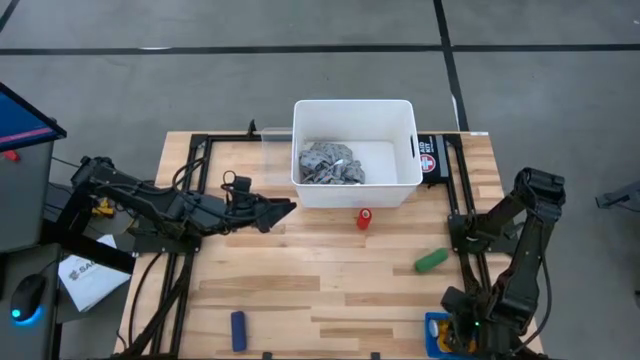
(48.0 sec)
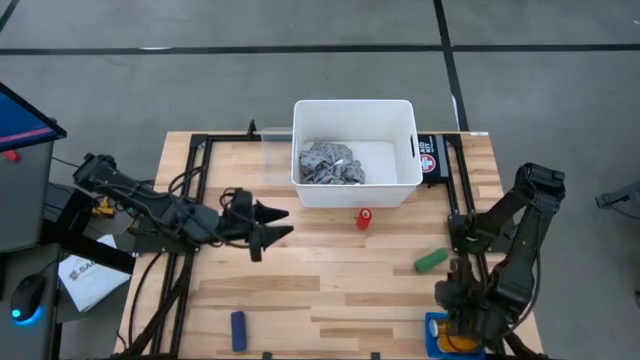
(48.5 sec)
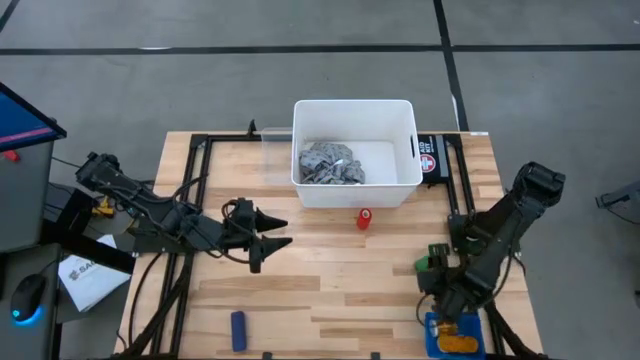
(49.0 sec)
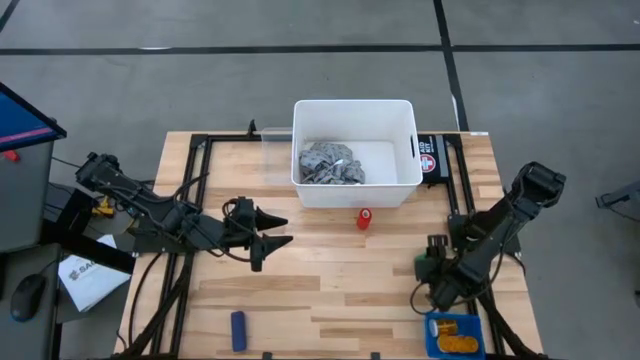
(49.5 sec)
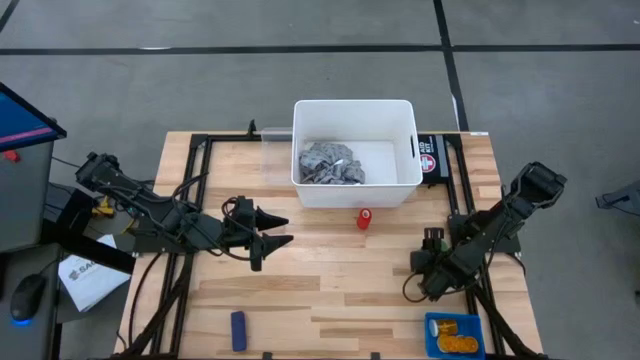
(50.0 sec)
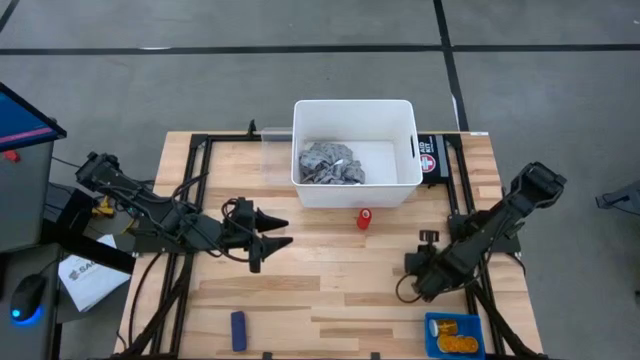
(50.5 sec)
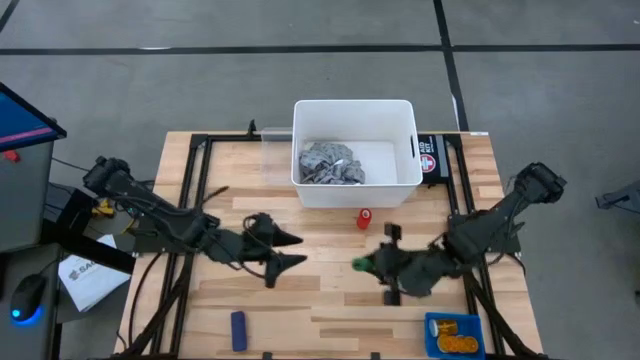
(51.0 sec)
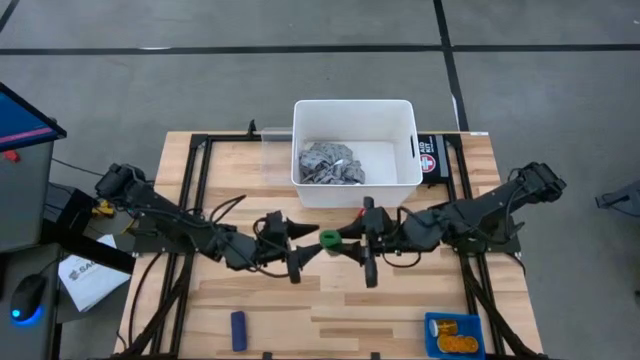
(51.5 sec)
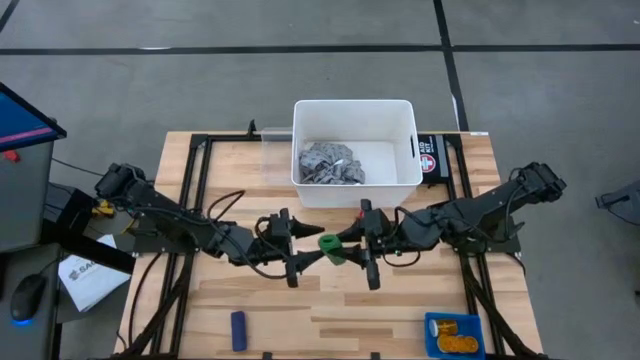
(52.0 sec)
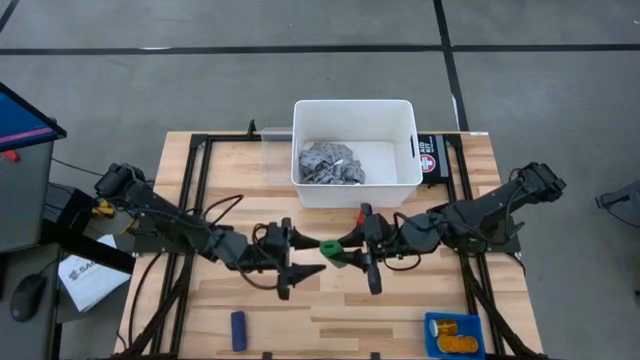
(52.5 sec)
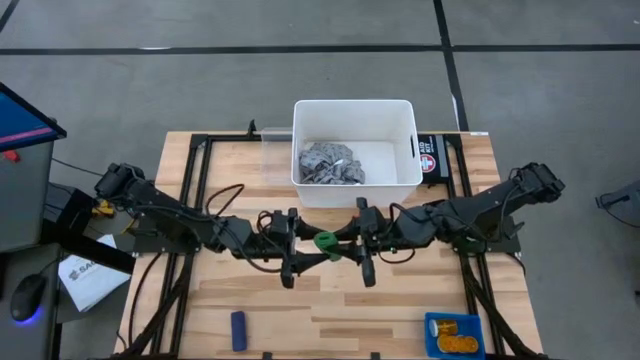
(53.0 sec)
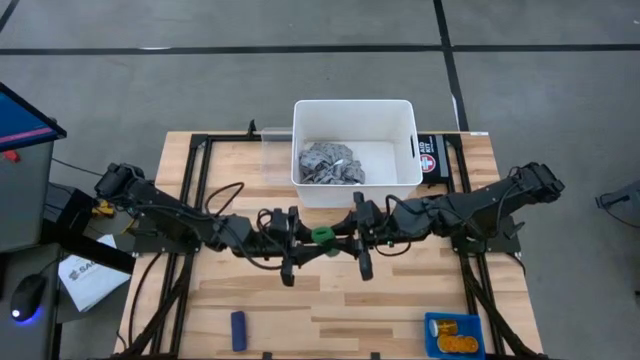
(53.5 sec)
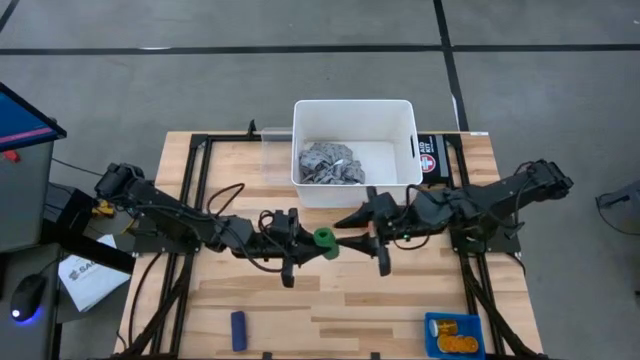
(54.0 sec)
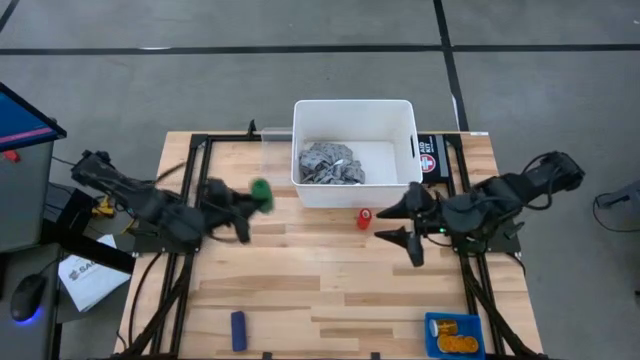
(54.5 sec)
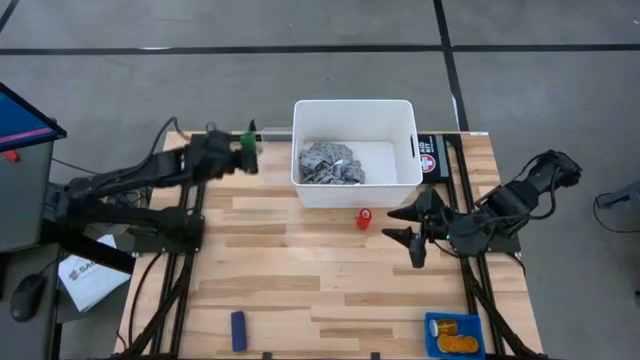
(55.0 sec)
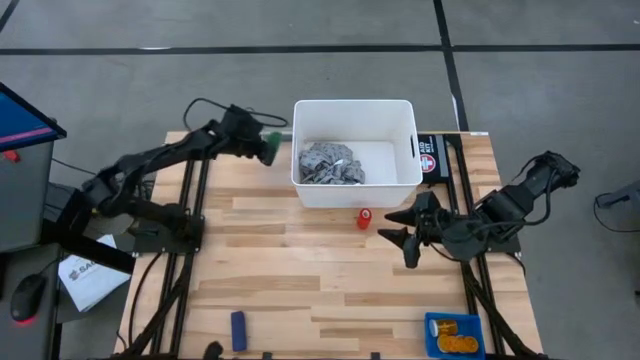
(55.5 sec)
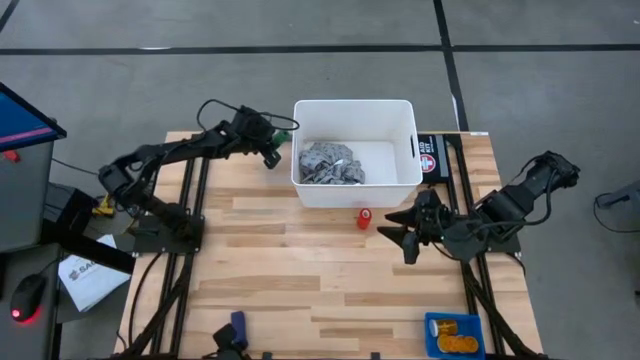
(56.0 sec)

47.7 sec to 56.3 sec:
Task: Pick & Place Medicine items
Put the green rolled bandage into the transparent bin

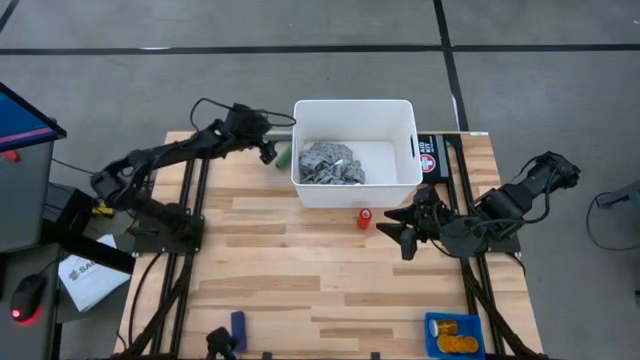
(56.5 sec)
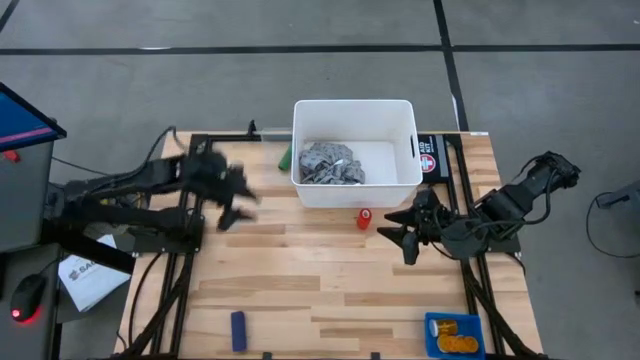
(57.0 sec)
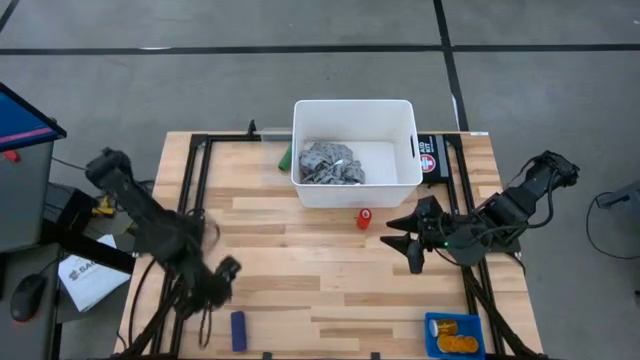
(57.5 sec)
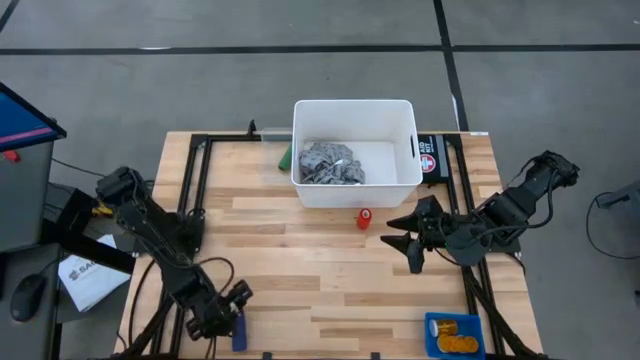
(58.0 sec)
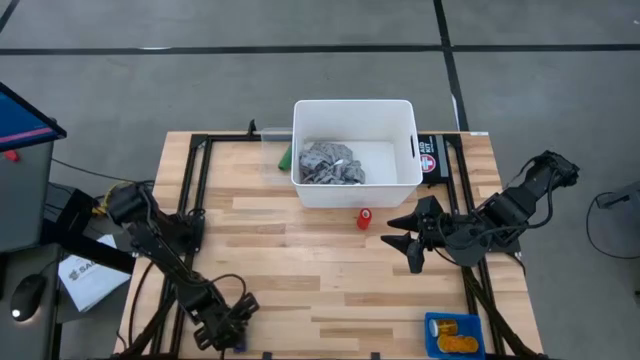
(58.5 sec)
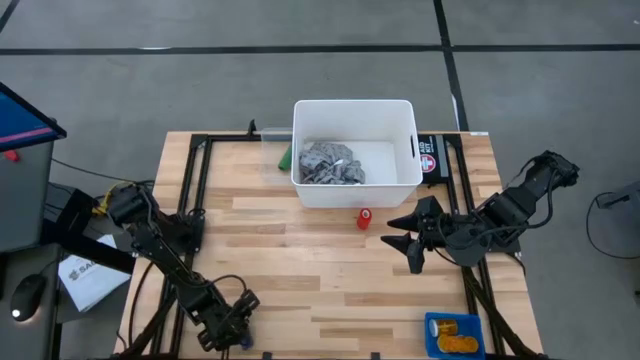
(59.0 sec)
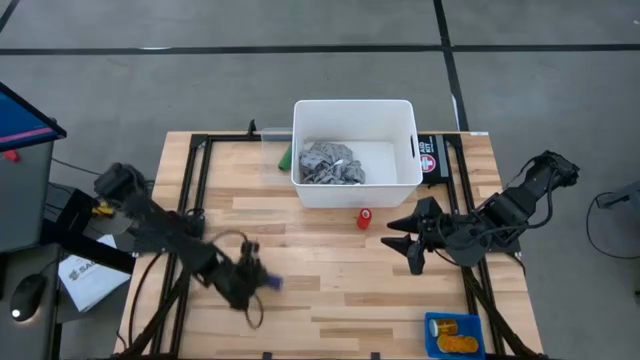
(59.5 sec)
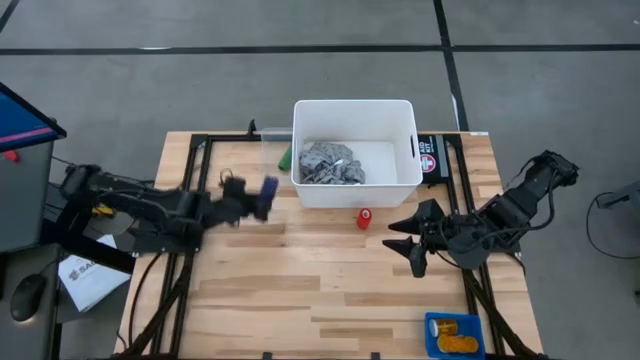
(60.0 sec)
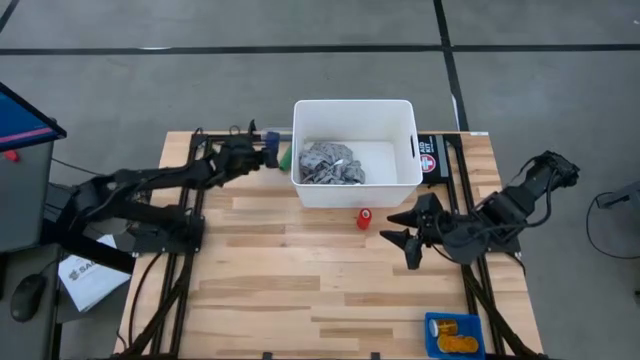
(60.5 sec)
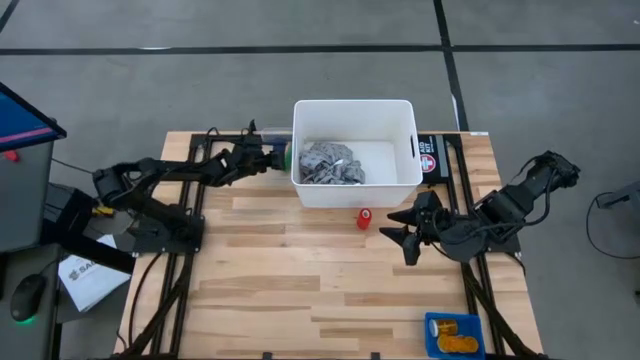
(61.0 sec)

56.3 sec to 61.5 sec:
Put the blue rolled bandage into the transparent bin

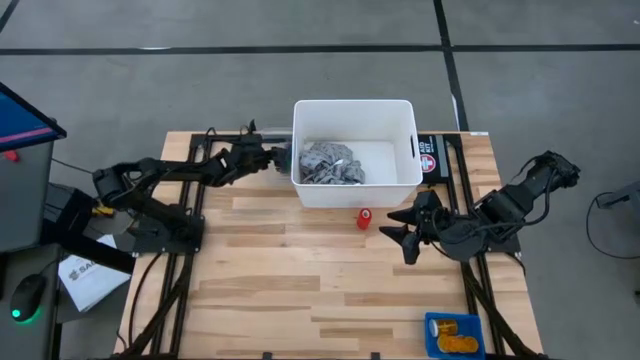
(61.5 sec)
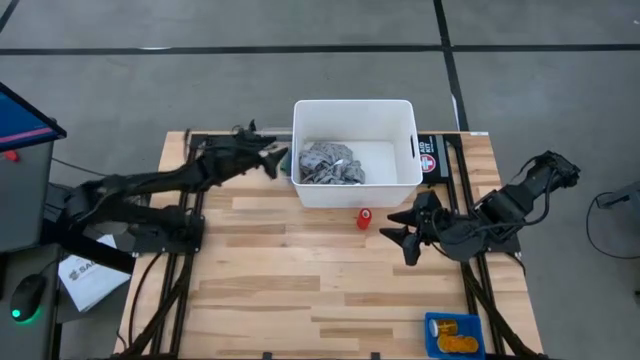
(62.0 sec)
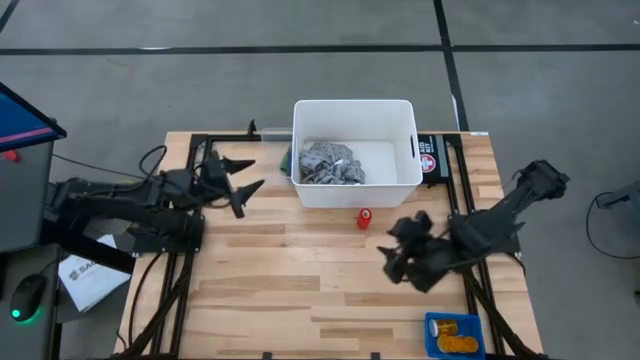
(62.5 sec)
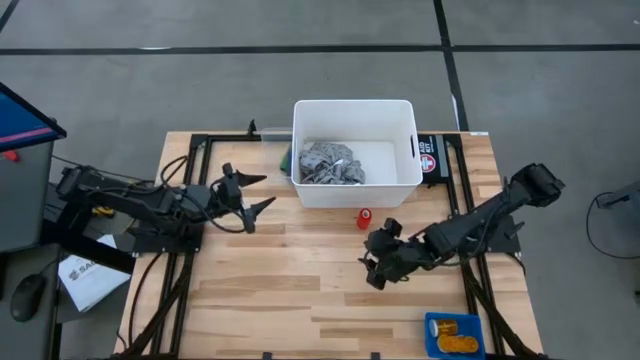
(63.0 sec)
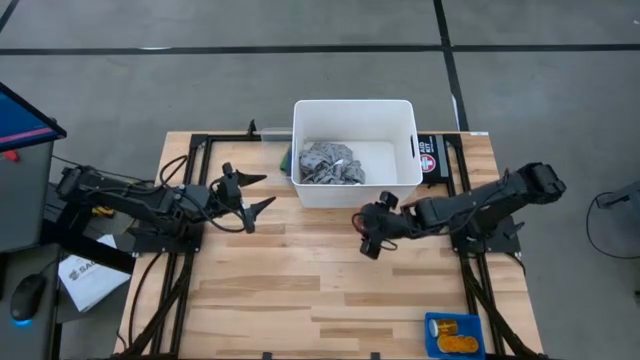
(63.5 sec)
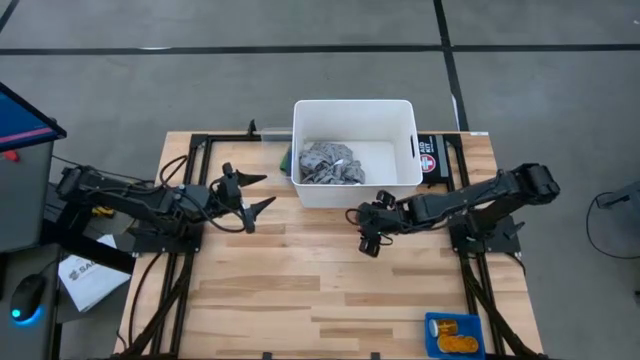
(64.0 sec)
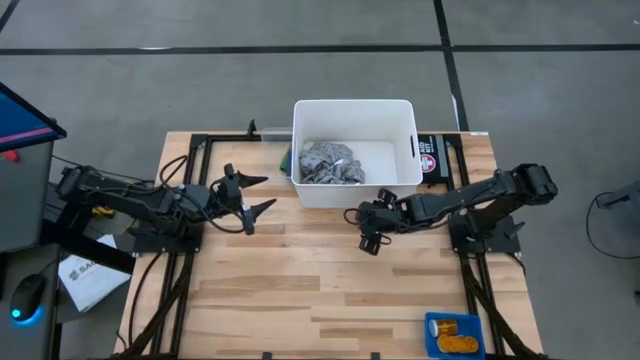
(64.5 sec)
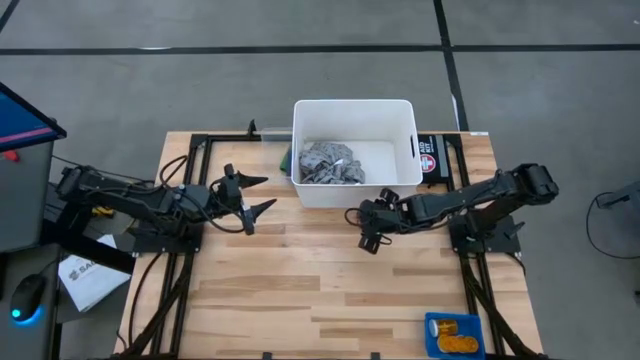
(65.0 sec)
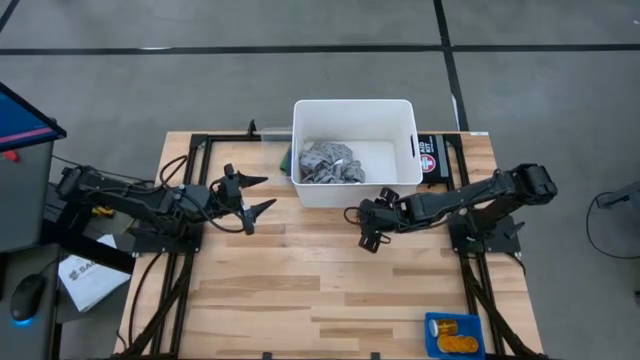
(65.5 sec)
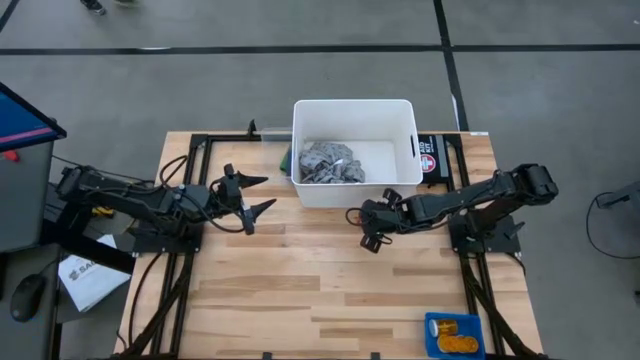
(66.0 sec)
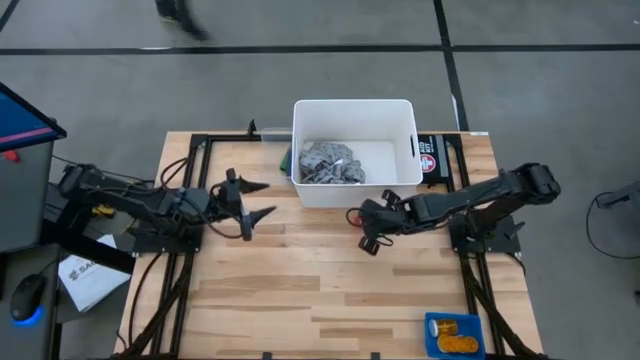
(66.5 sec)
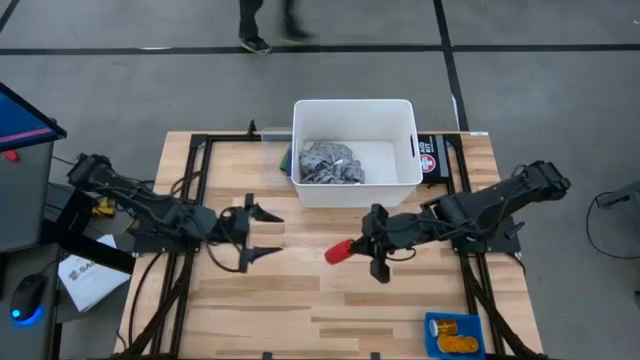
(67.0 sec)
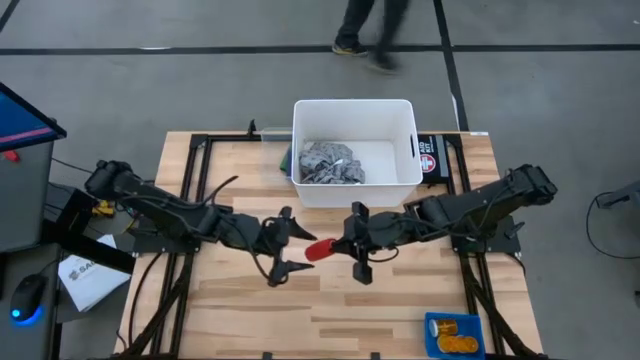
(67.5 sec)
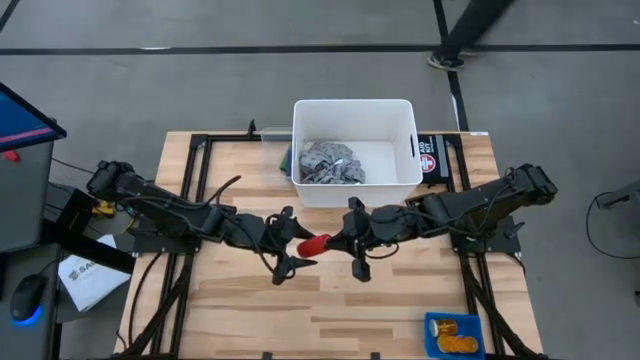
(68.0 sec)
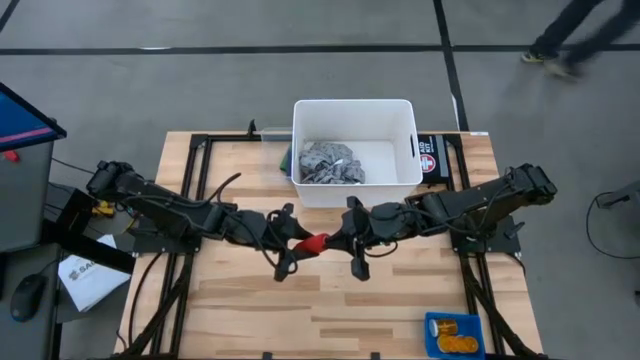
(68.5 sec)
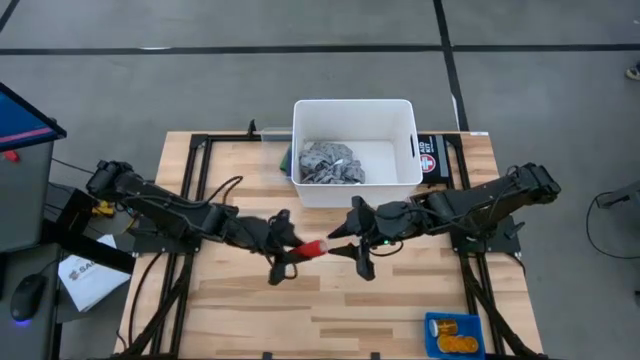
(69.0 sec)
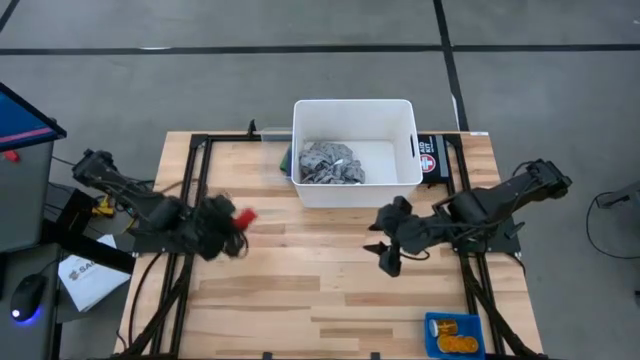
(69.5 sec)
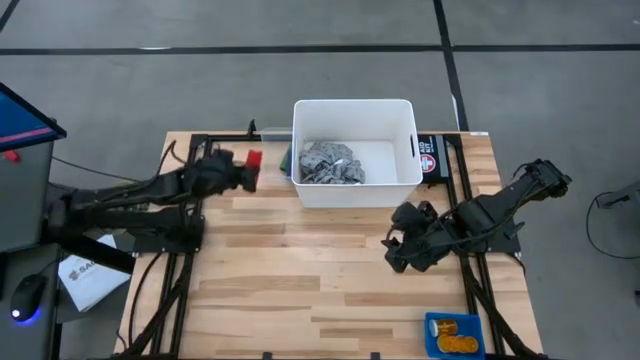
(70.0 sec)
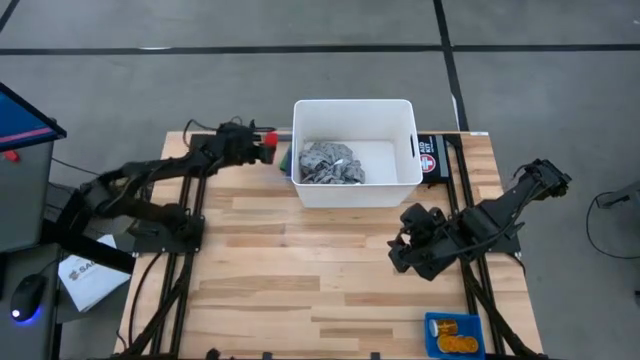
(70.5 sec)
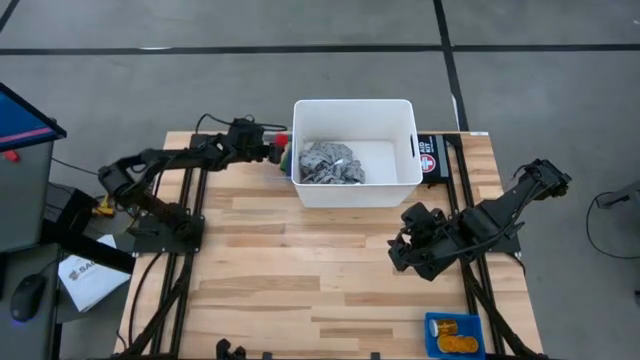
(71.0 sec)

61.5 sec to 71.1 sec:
Put the red rolled bandage into the transparent bin
